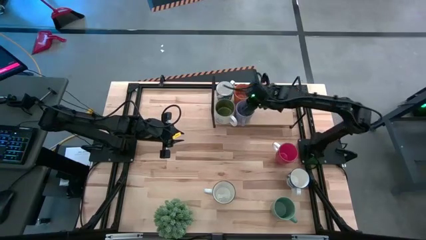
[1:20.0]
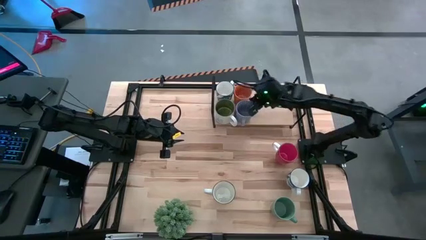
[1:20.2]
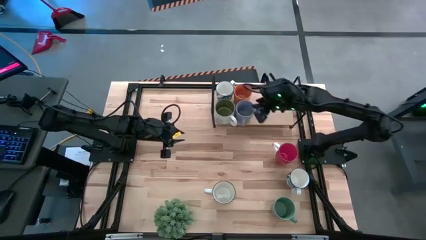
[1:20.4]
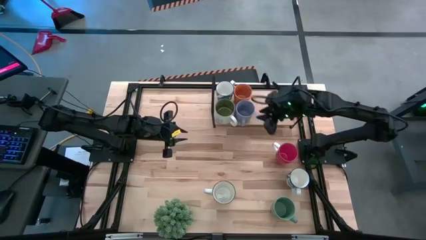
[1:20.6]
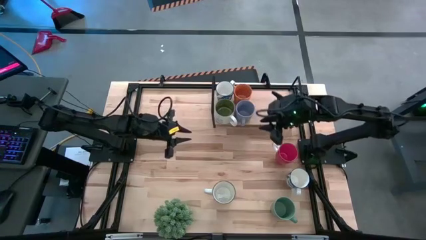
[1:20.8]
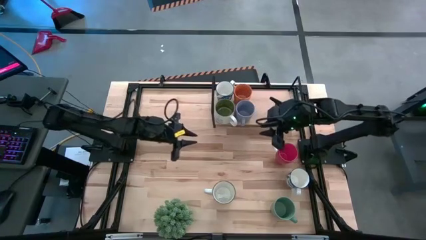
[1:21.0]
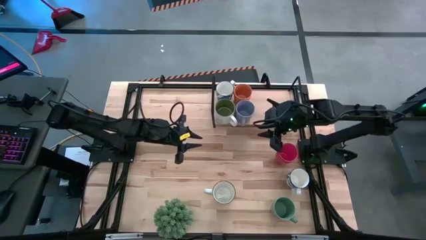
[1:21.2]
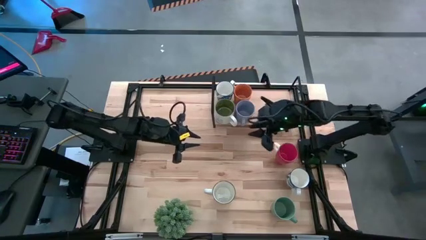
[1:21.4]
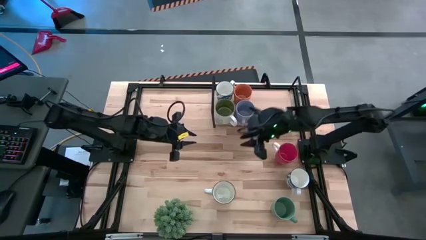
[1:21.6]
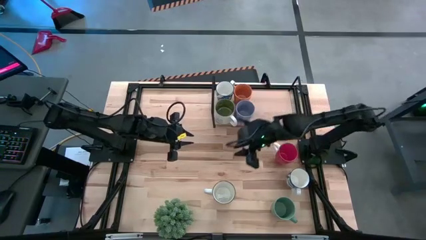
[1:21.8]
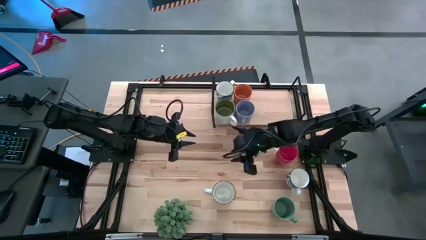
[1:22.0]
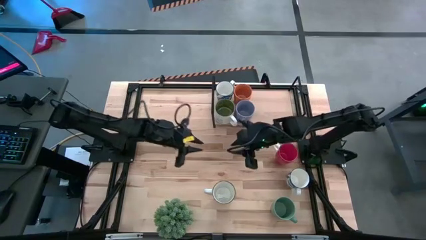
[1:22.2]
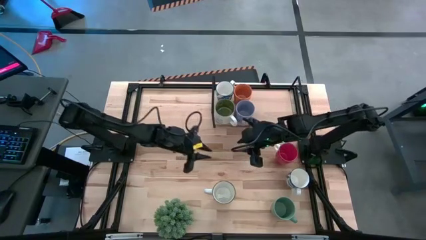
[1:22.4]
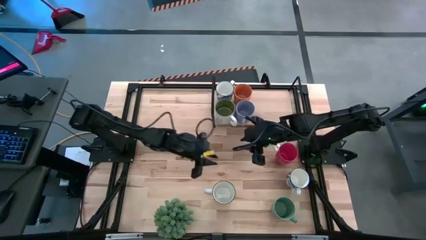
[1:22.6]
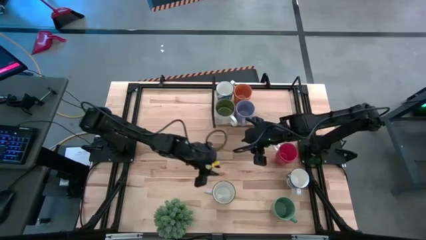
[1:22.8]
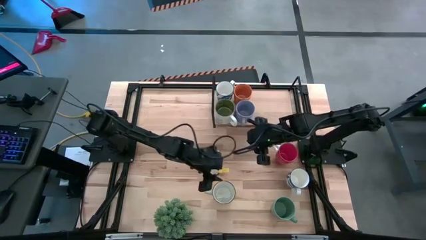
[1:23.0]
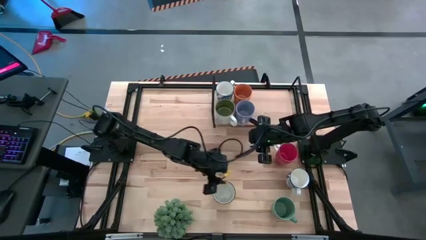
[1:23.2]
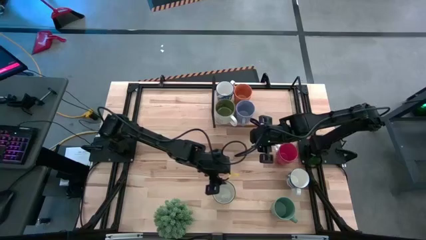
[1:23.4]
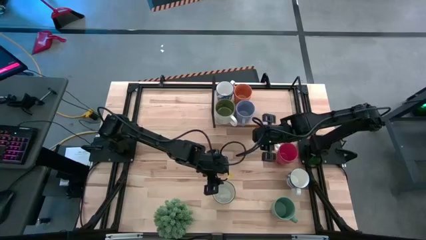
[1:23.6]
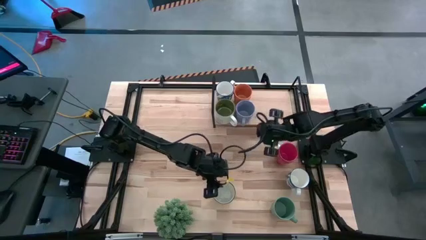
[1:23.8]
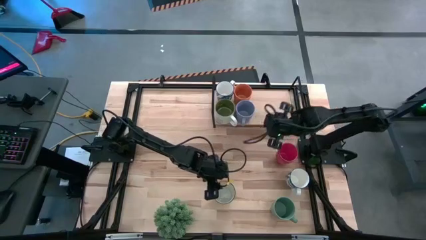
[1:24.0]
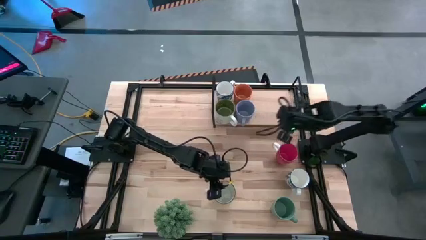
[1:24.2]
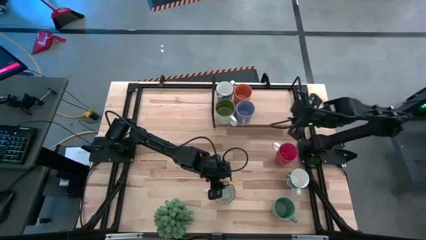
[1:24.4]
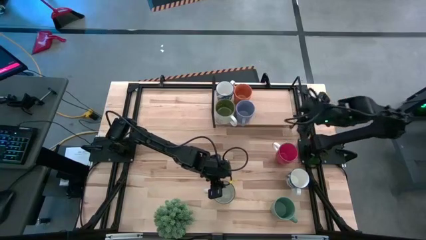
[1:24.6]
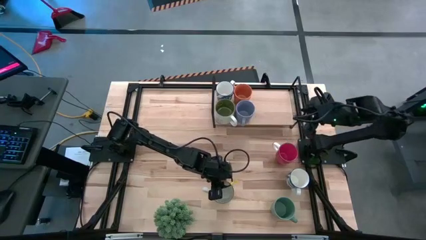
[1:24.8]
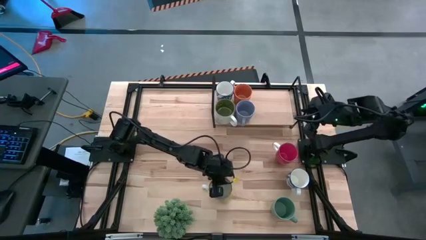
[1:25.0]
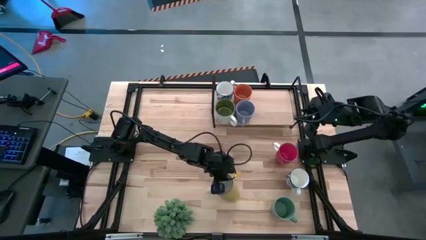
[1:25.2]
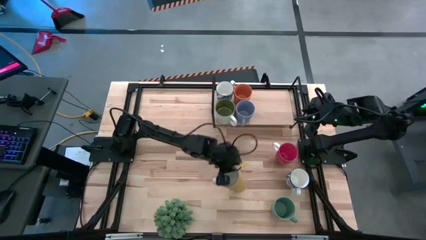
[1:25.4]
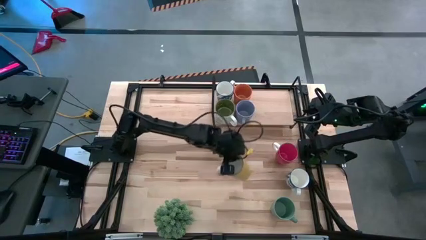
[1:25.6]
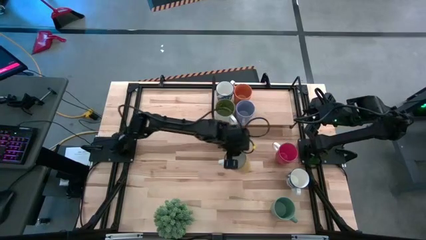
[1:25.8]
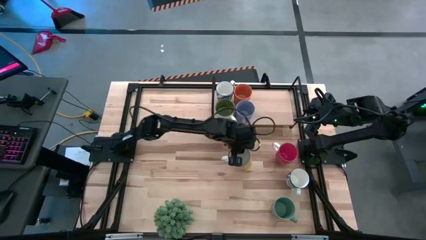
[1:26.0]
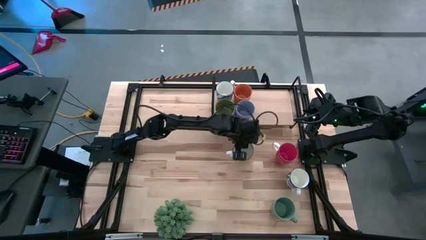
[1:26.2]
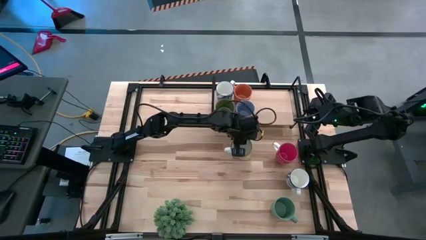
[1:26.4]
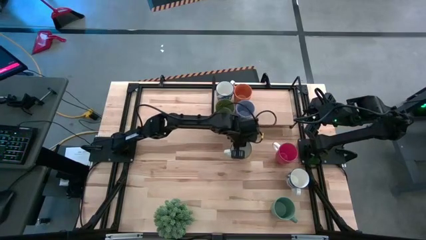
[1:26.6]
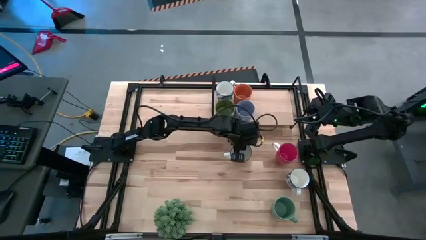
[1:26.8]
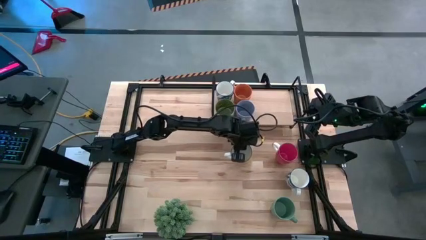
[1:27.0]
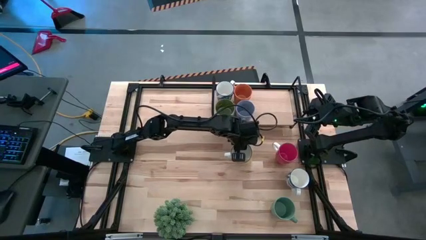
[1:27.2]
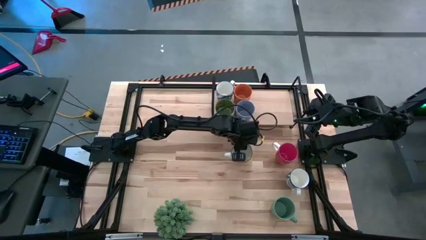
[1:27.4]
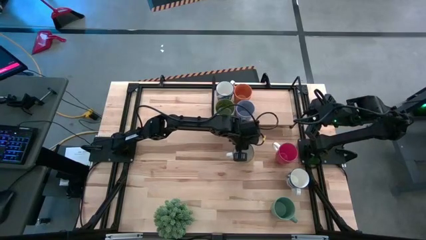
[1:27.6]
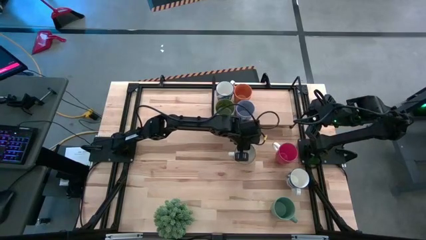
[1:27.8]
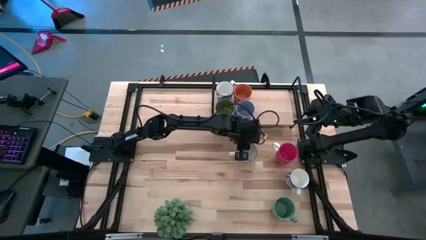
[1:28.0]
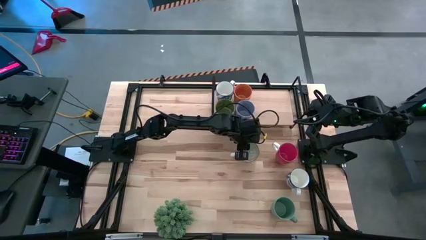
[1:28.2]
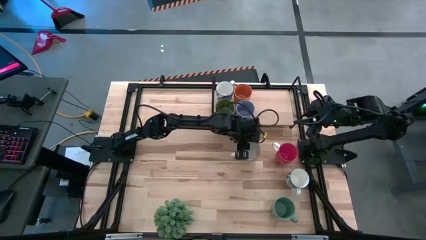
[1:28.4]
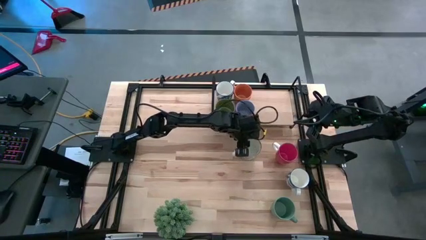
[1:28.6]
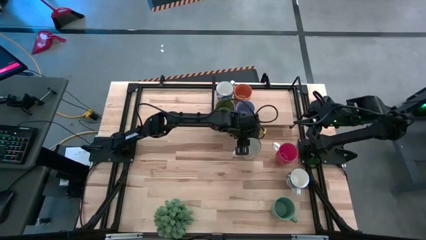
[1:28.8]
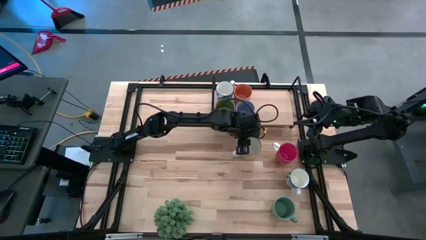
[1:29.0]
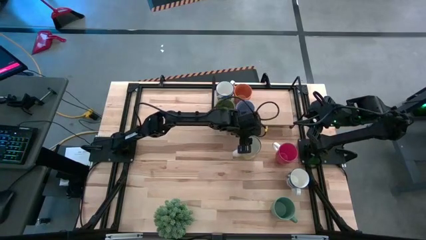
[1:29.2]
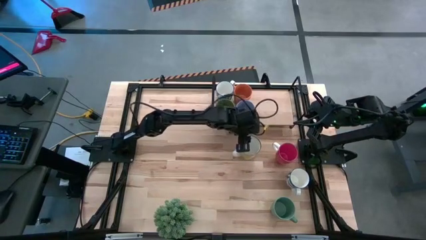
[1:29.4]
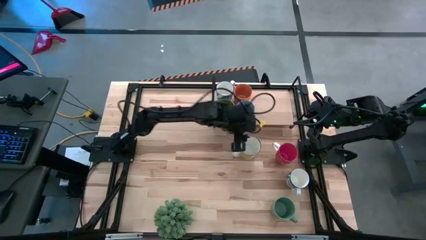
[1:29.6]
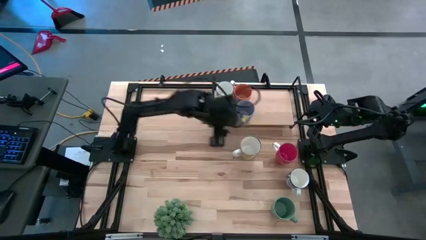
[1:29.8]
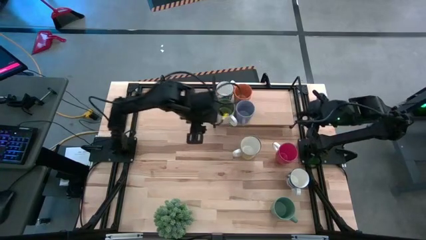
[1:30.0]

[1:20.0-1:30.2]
Task: Place coffee mugs
Put the yellow mug on the shelf

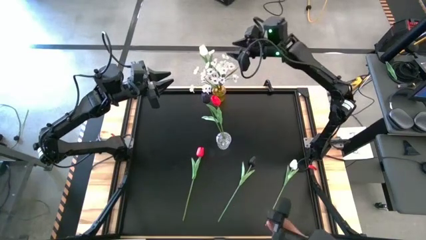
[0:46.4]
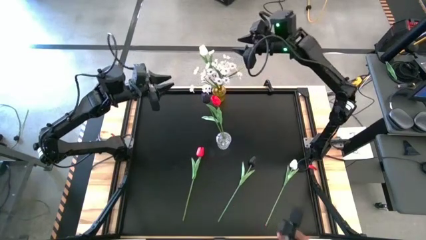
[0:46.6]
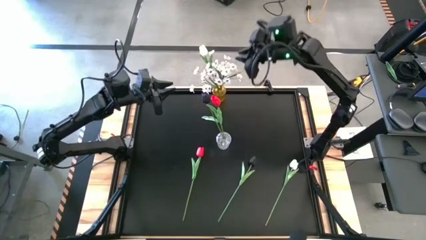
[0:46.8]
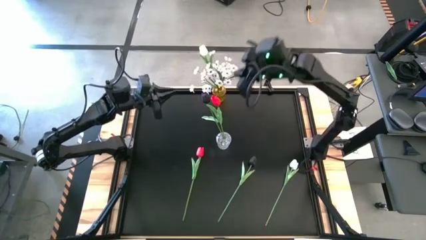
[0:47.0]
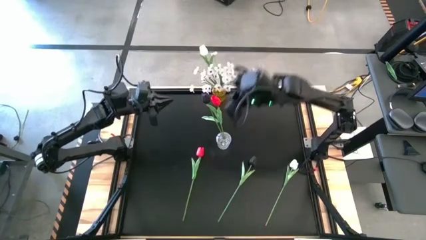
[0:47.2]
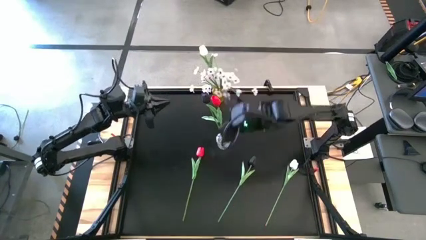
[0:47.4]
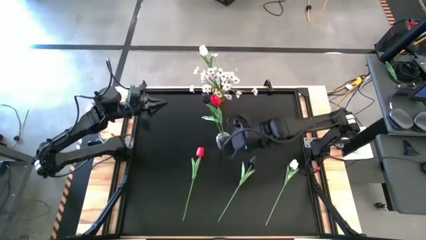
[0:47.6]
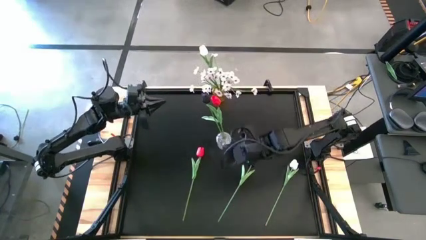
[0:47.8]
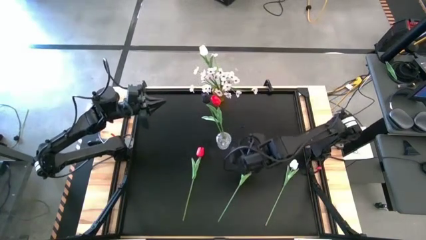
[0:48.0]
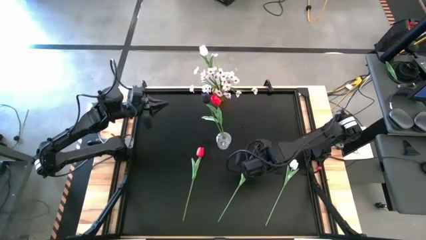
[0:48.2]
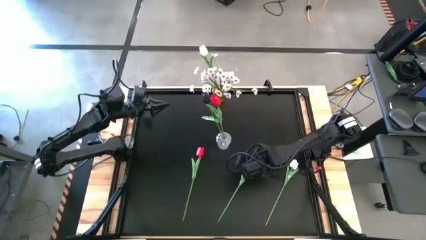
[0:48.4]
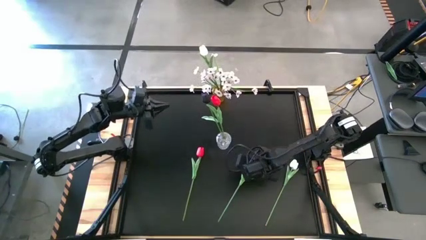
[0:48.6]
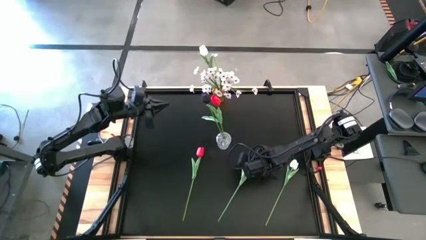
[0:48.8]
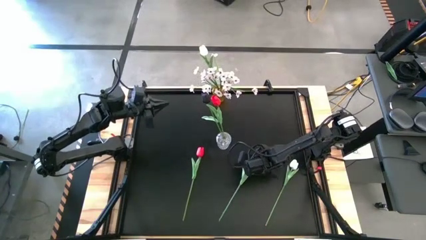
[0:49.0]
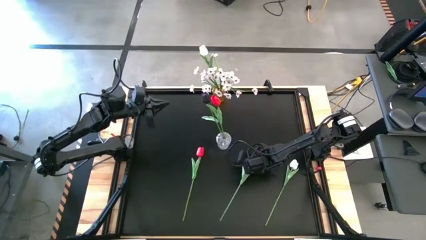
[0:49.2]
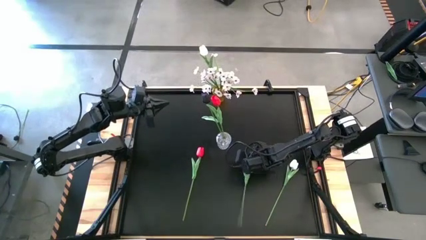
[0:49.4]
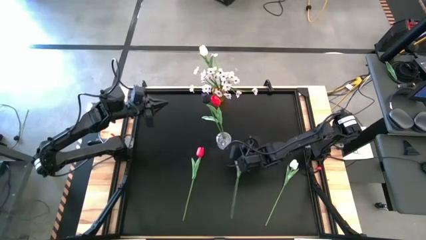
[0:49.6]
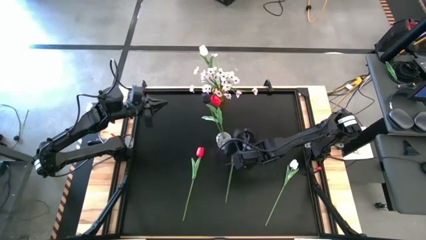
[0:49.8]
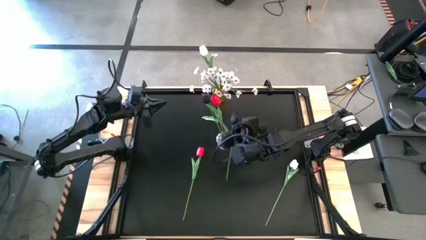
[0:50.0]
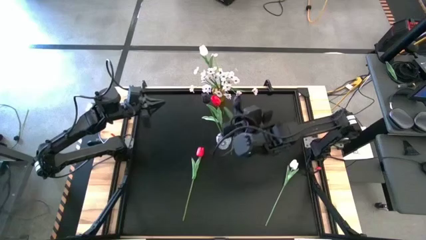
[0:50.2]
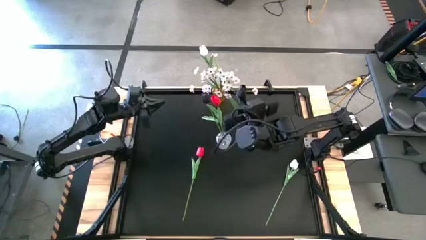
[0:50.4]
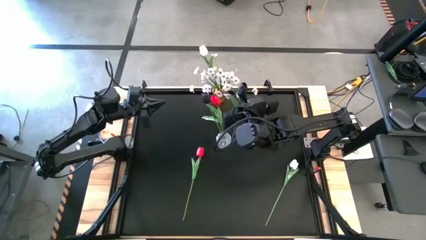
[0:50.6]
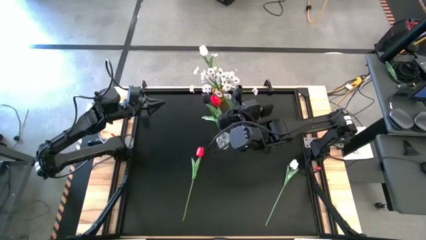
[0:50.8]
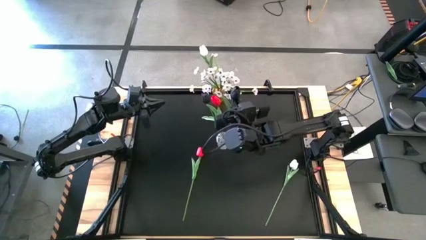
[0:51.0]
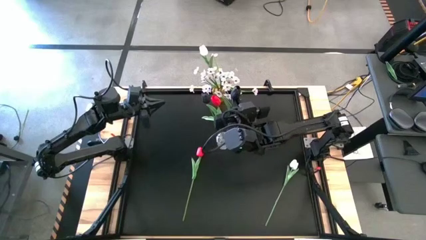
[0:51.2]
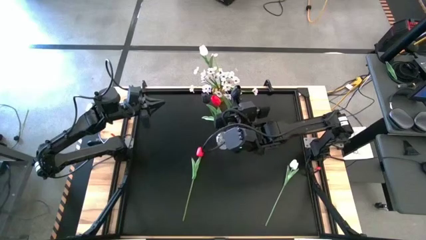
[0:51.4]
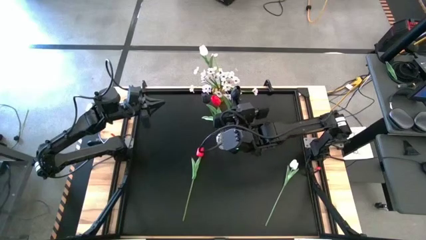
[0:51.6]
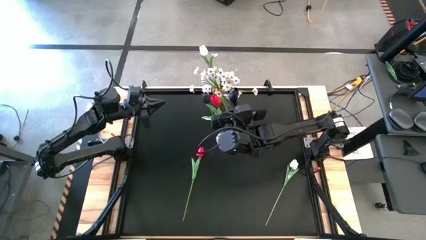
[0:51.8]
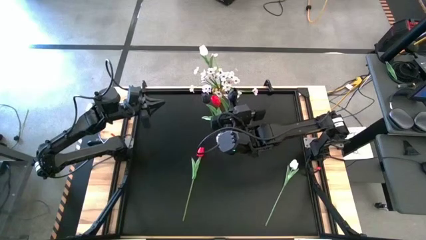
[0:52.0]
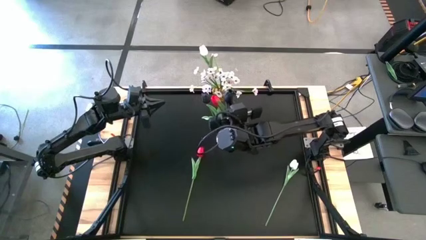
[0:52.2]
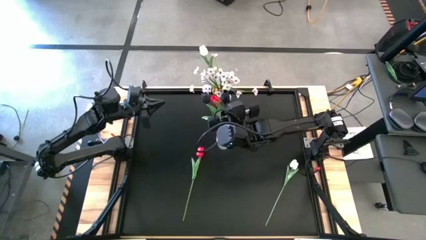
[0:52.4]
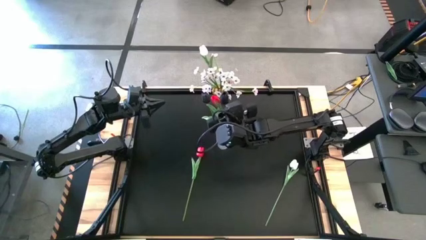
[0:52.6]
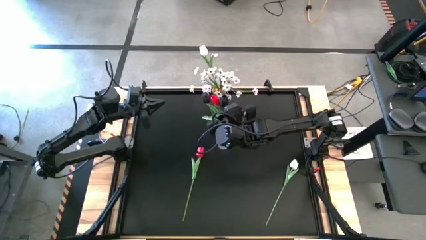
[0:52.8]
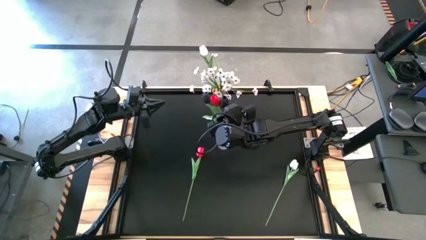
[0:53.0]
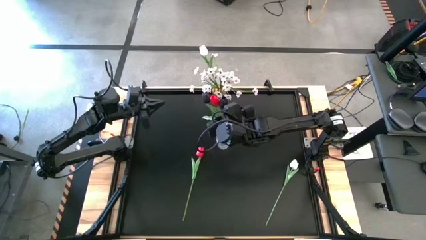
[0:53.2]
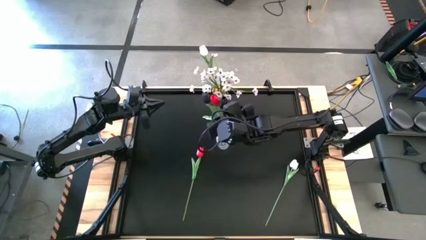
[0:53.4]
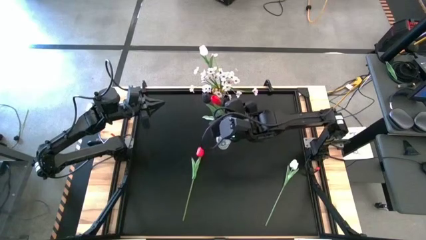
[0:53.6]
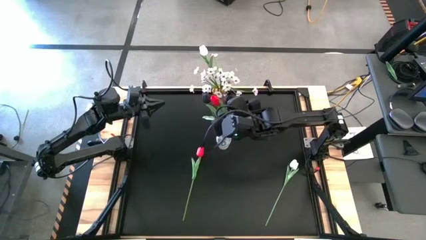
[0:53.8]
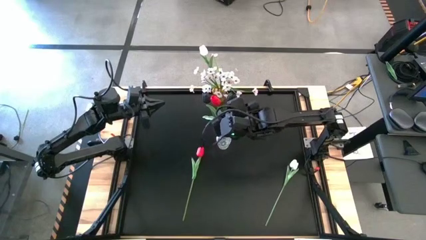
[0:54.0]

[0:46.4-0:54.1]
Task: Sort flowers into vase by color
Put the black tulip into the transparent vase
